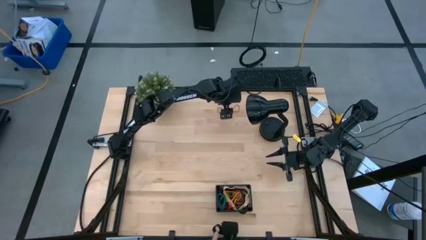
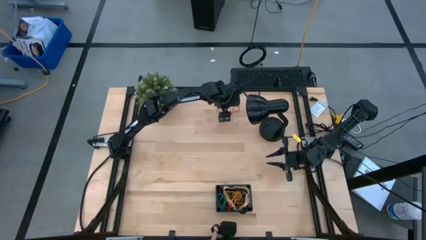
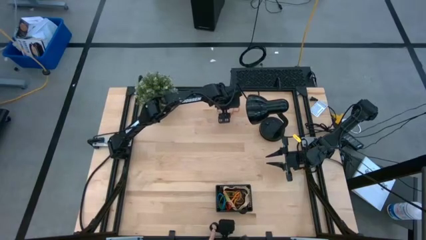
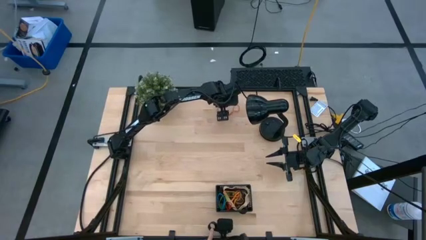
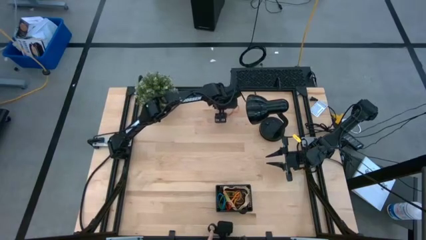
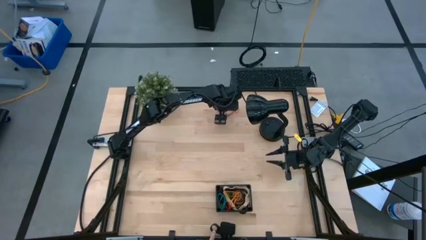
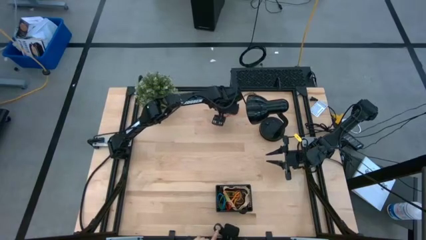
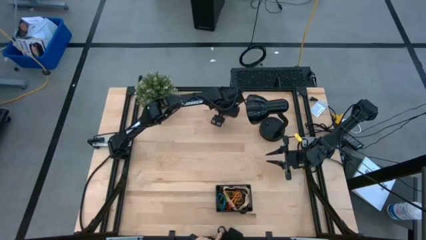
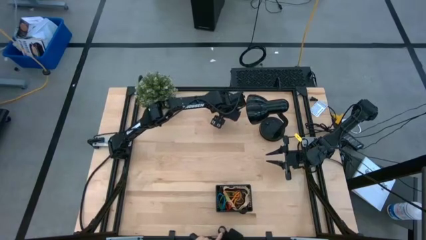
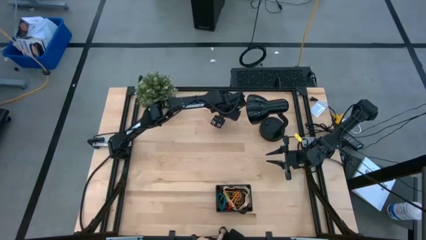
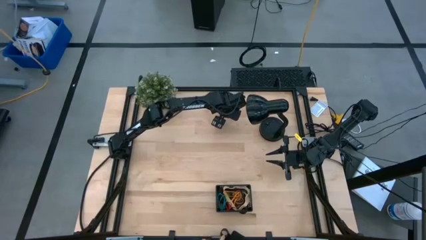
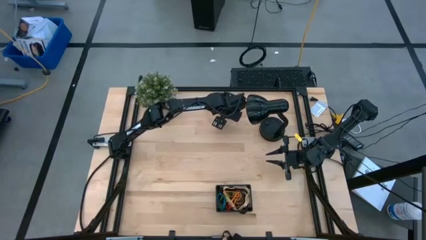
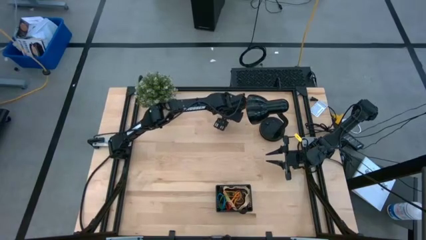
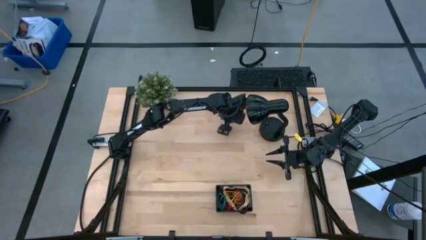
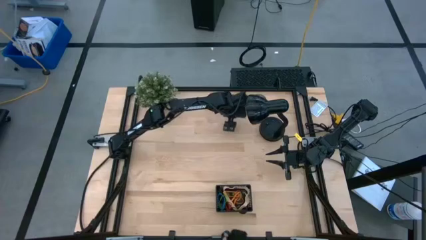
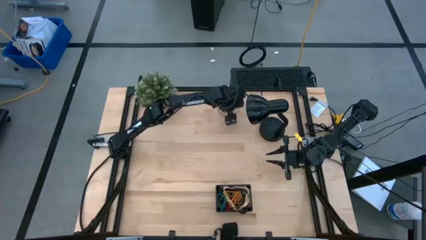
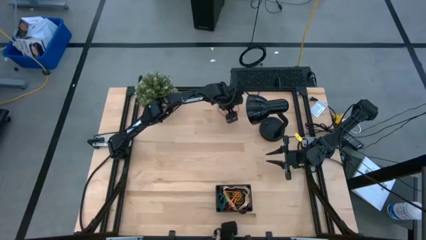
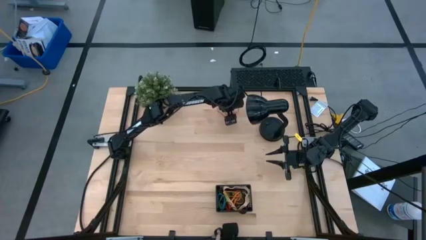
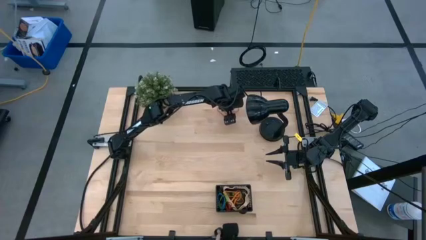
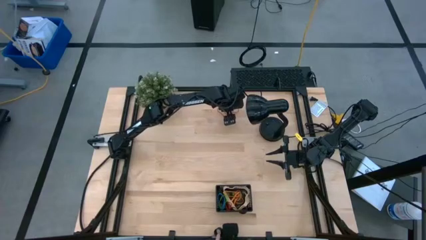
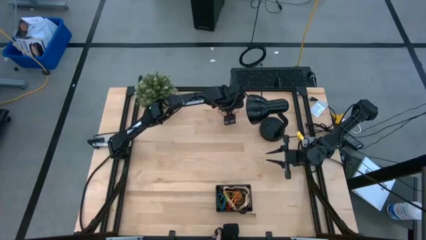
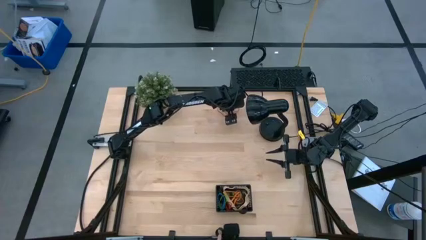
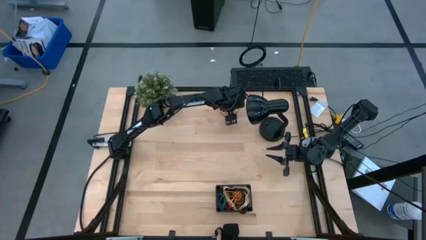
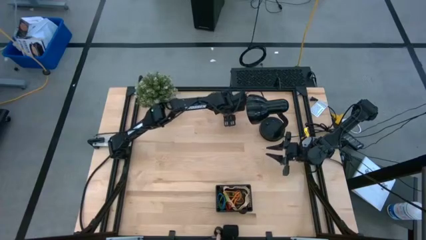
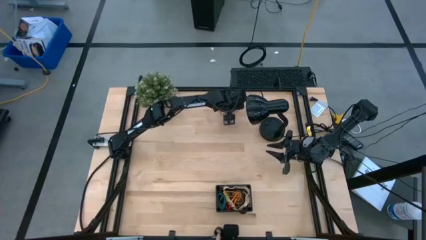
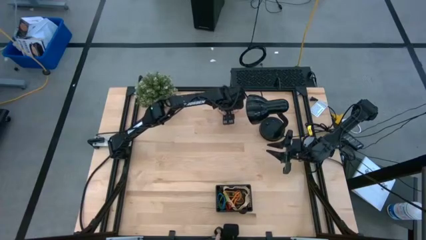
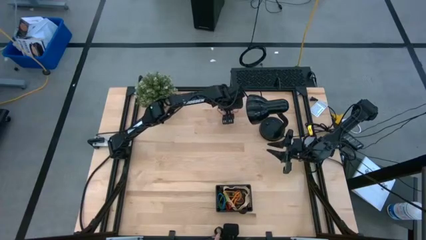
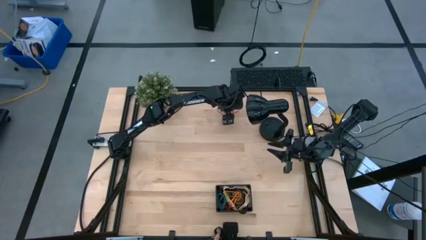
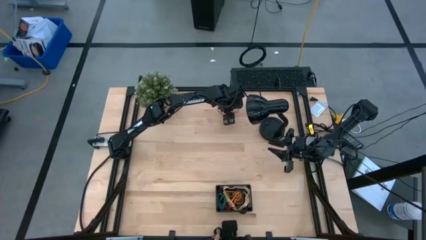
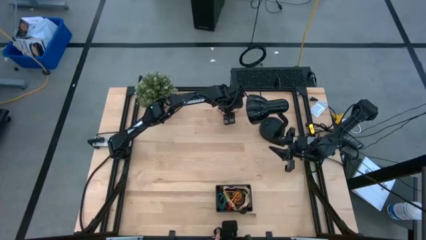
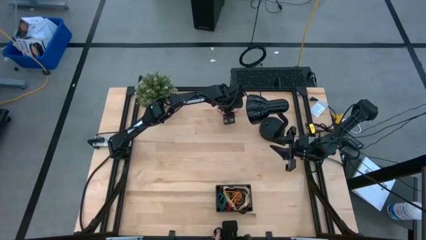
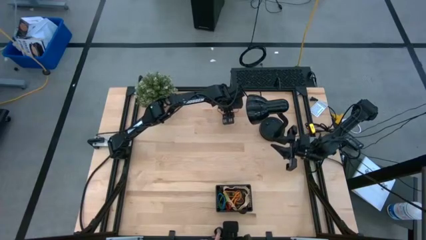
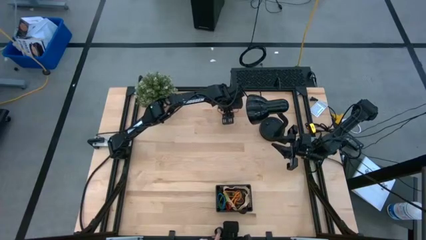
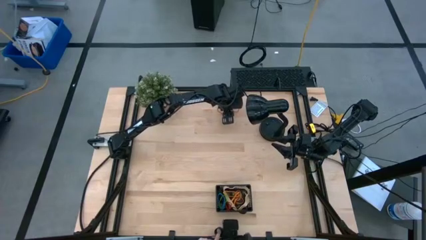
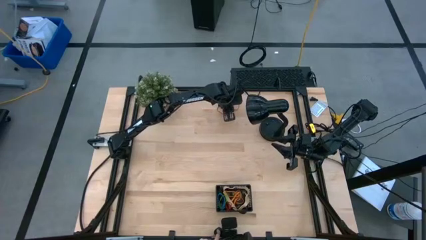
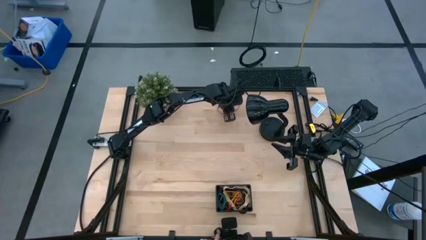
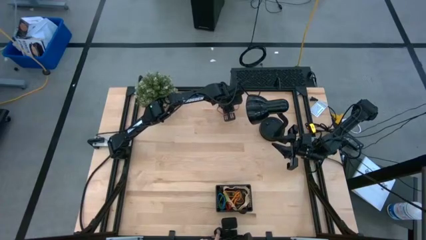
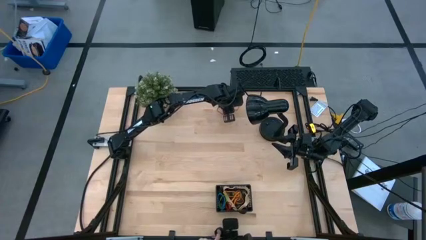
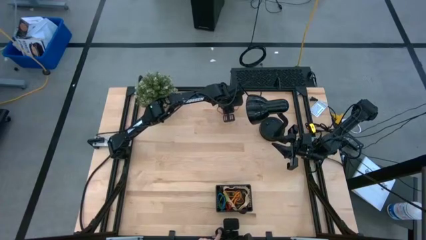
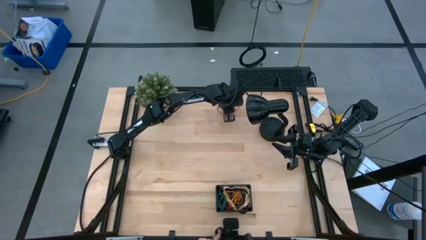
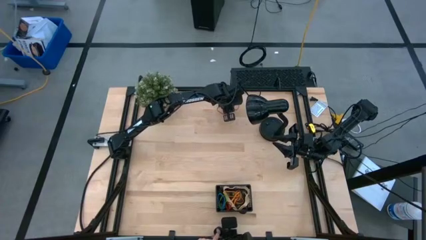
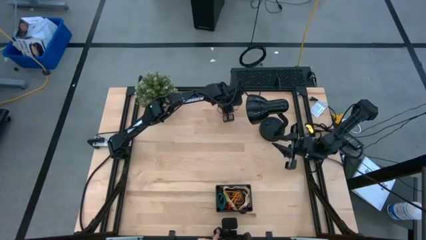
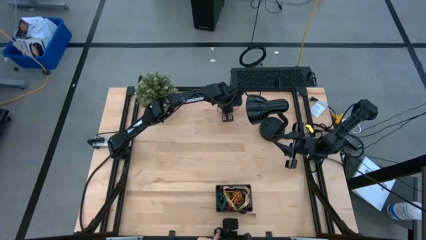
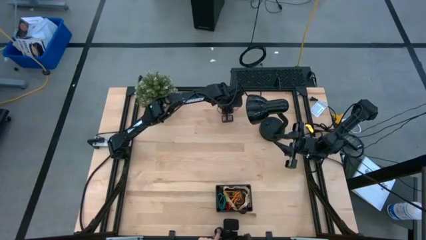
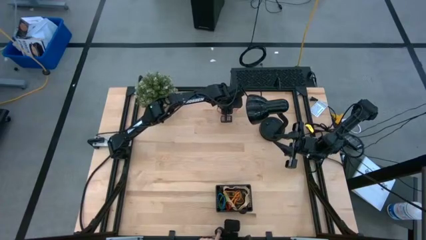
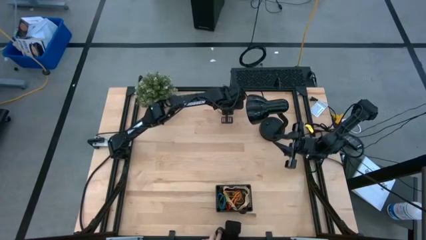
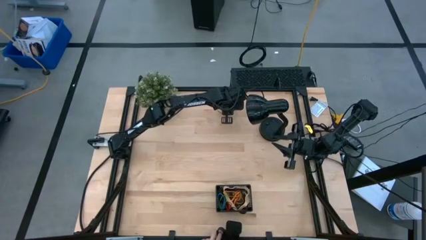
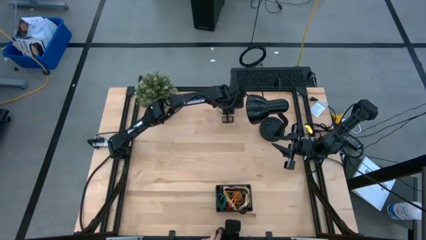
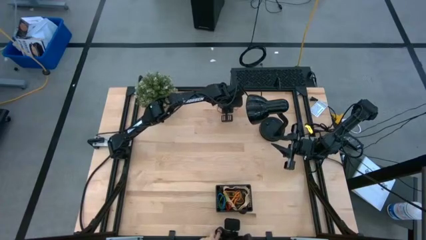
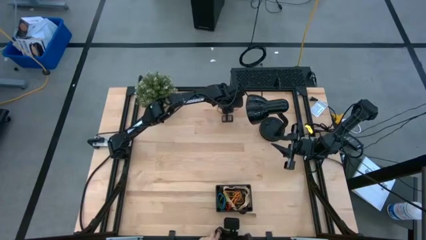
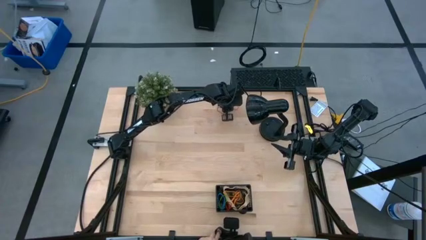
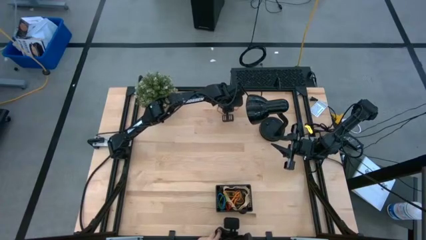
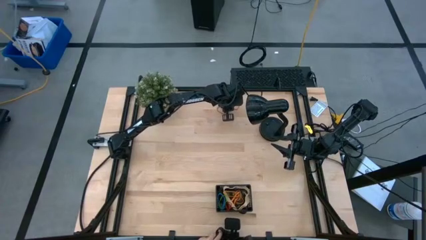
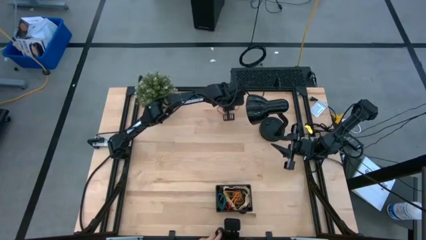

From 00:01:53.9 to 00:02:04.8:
Task: Pick and place rubber bands into bin
Put the red rubber band into the black bin

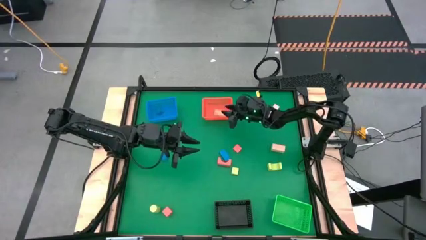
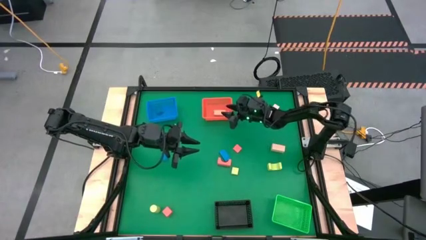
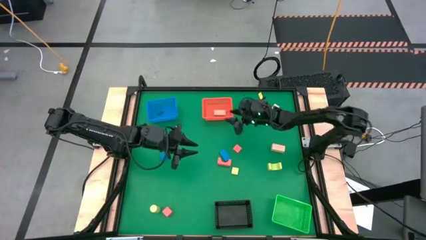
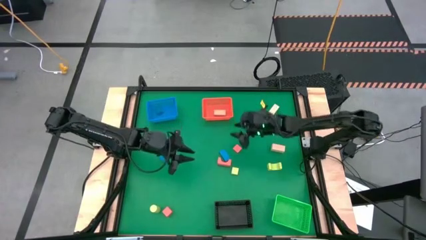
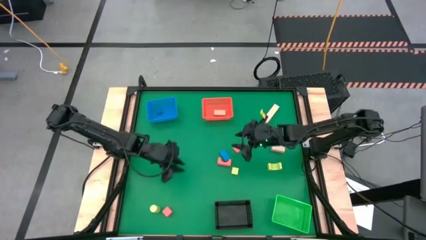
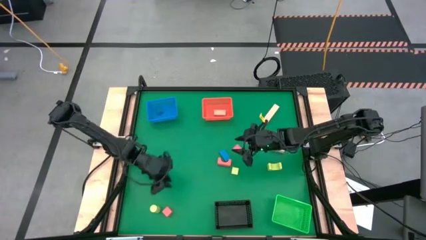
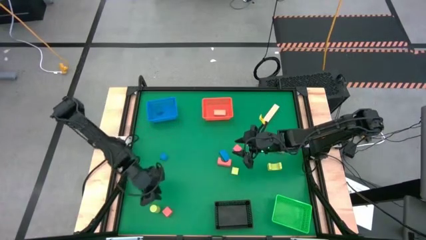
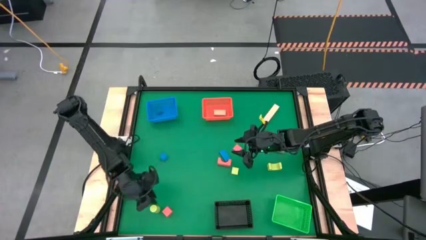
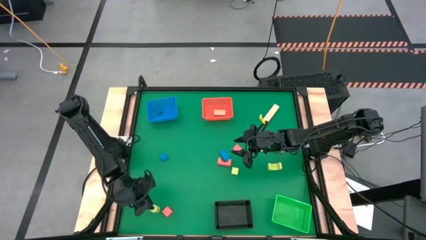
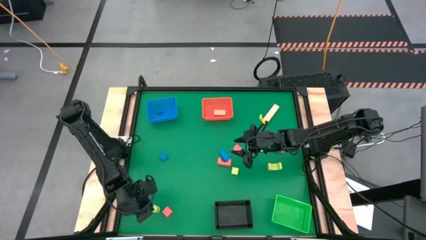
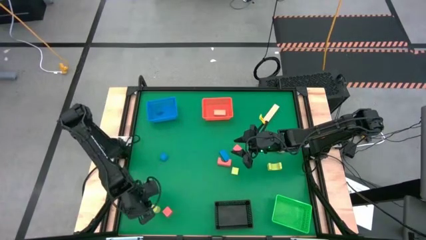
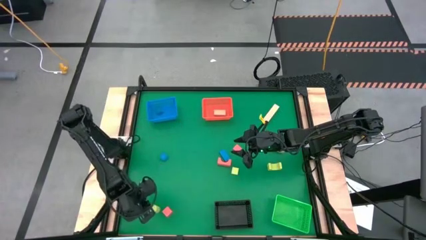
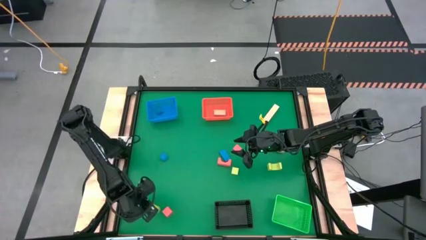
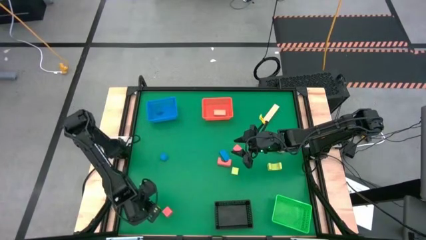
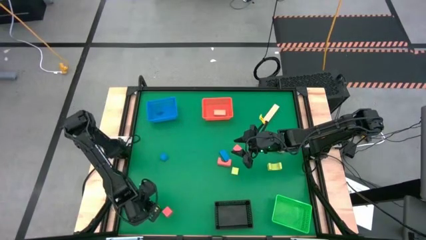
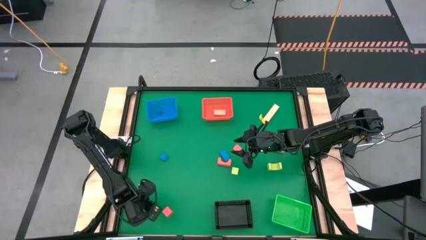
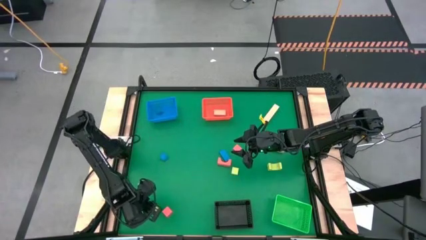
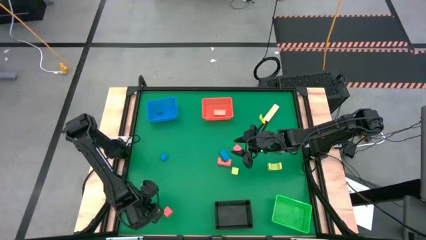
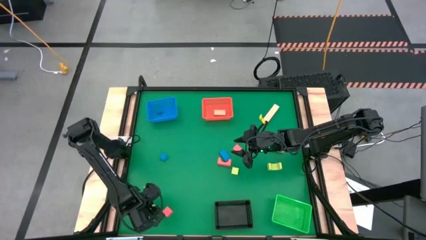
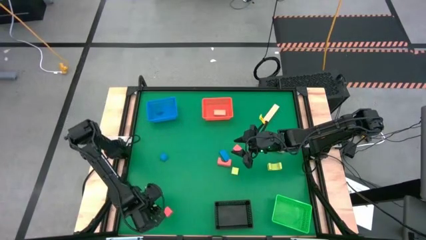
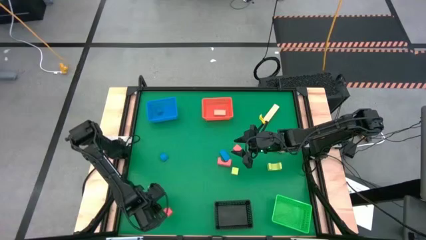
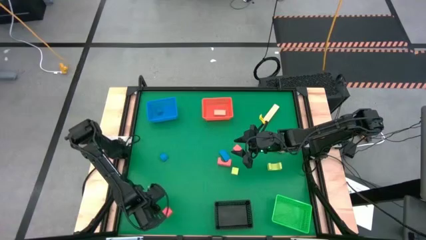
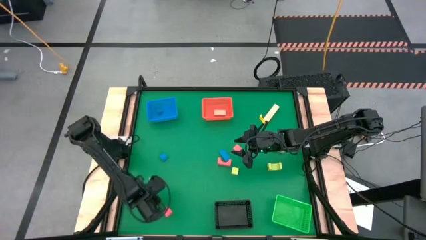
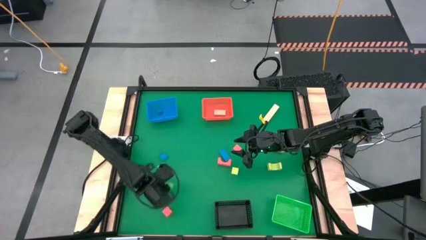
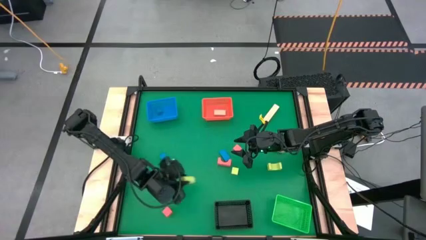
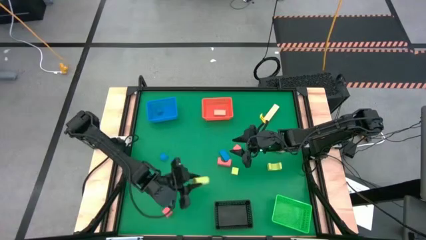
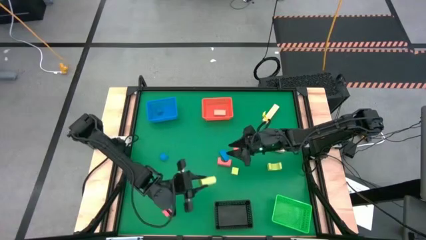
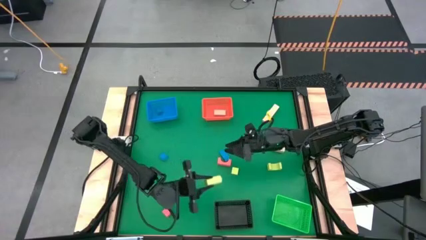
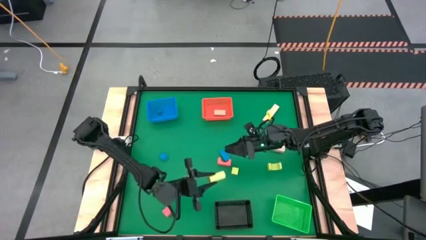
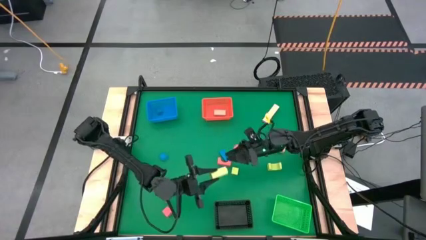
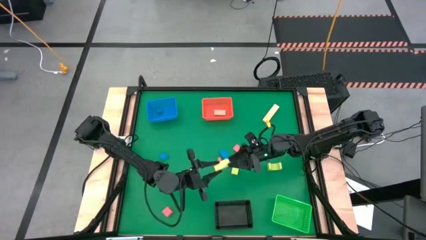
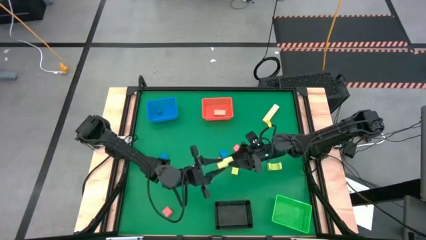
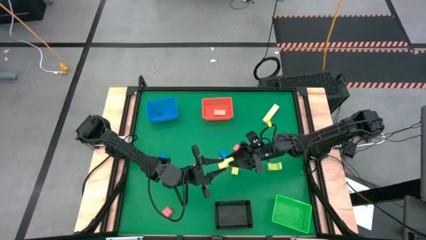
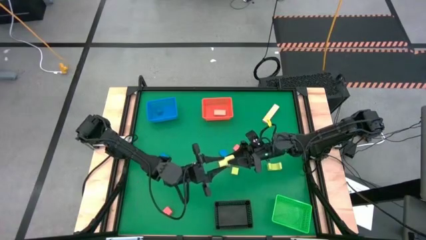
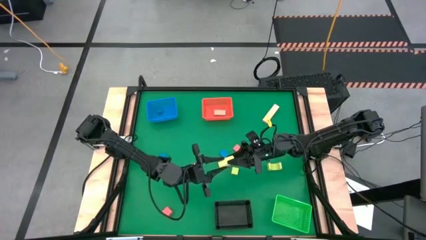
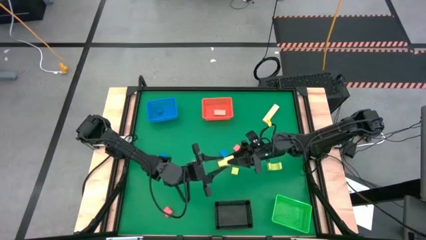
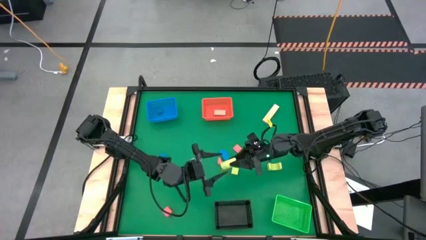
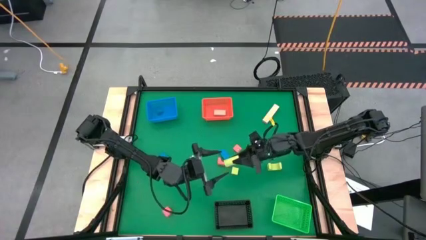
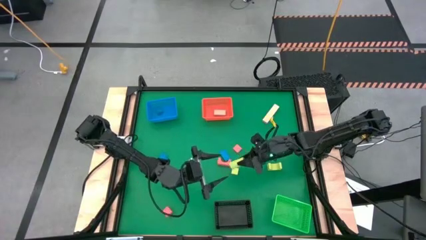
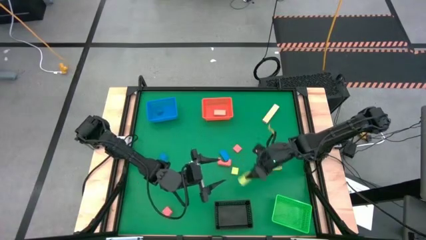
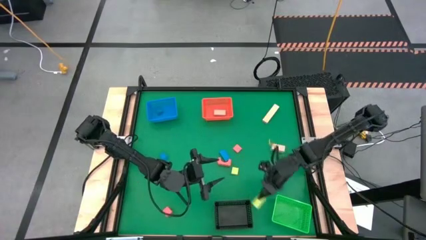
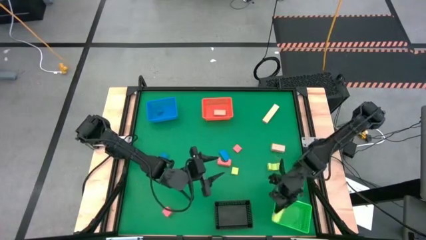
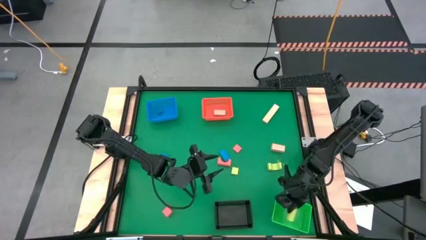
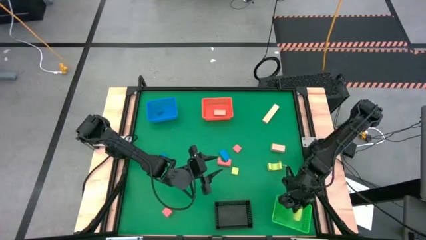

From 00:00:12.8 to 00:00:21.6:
Task: Sort & place blocks by color
Put the bottom green block into the green bin
